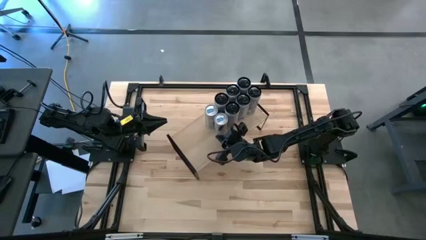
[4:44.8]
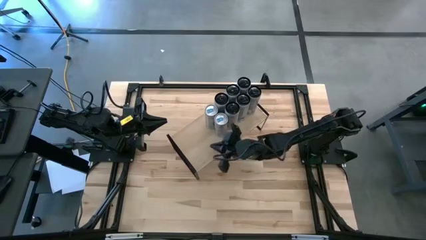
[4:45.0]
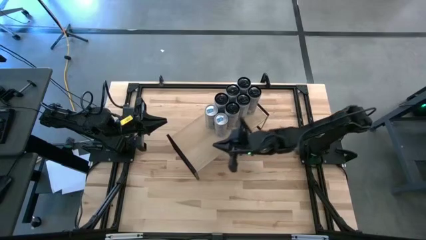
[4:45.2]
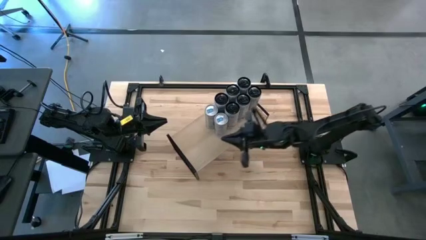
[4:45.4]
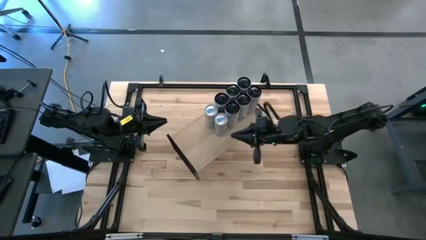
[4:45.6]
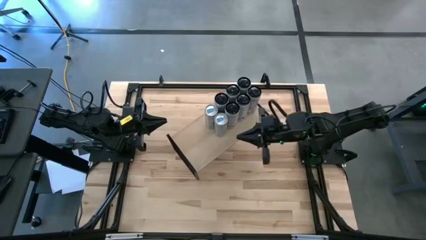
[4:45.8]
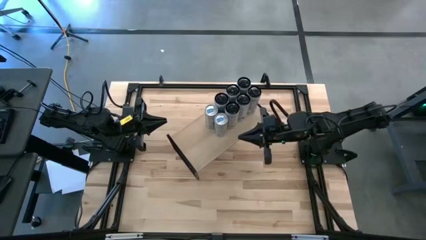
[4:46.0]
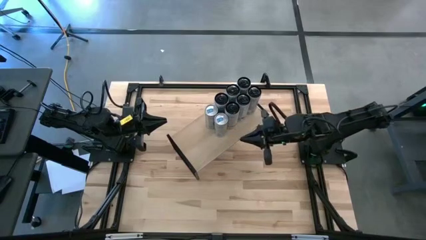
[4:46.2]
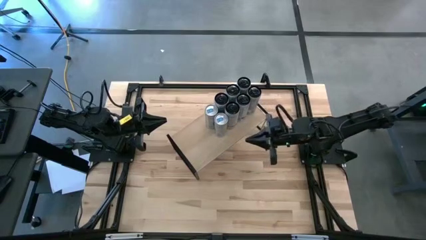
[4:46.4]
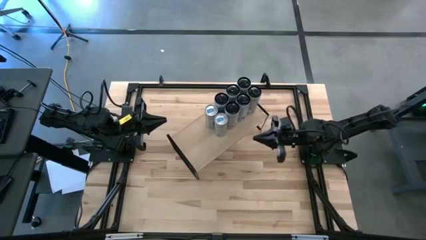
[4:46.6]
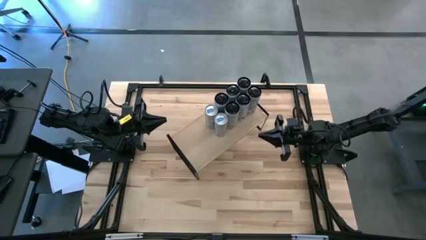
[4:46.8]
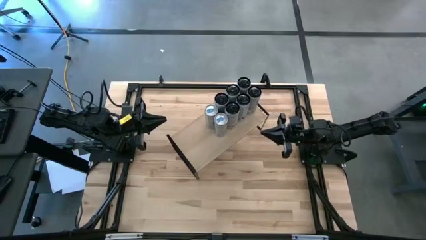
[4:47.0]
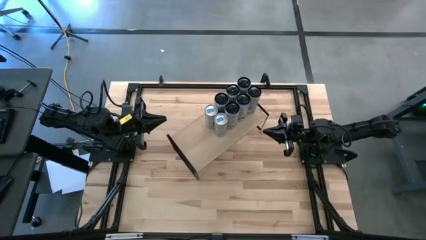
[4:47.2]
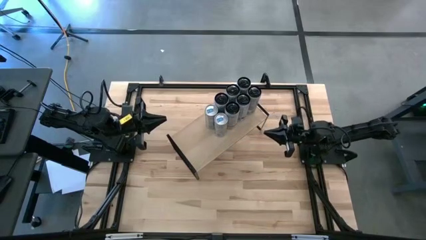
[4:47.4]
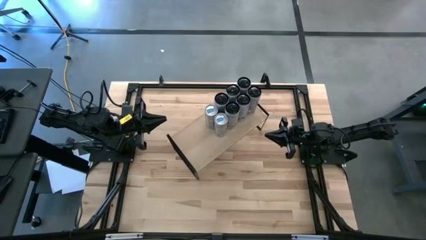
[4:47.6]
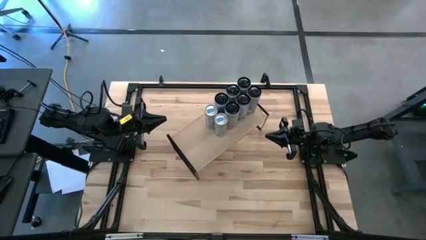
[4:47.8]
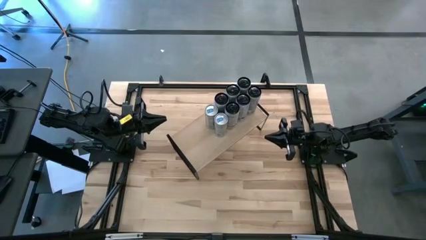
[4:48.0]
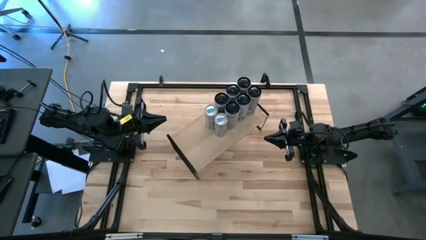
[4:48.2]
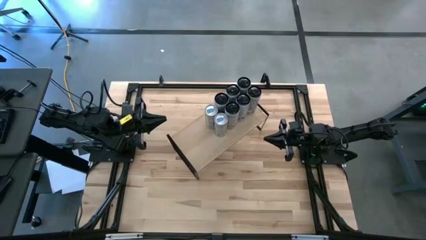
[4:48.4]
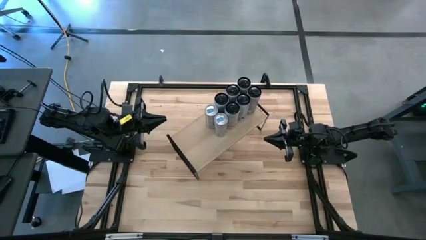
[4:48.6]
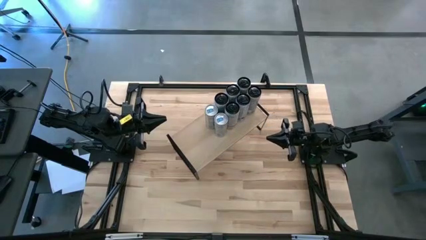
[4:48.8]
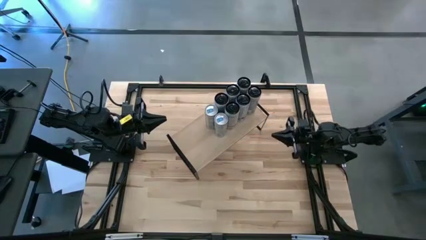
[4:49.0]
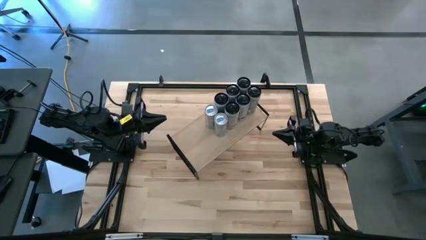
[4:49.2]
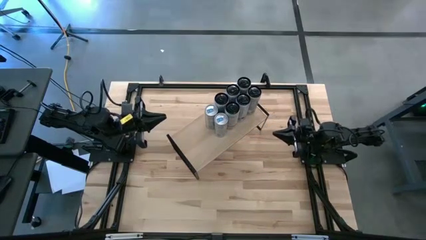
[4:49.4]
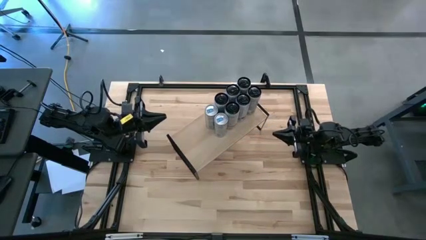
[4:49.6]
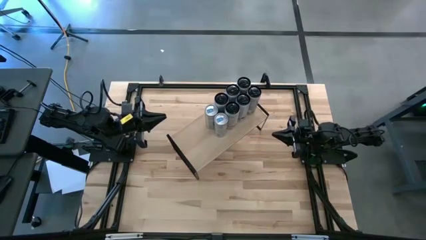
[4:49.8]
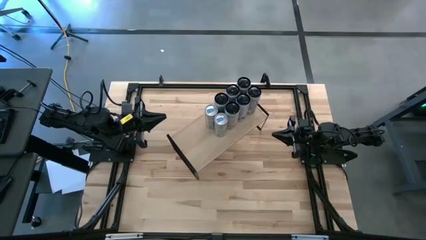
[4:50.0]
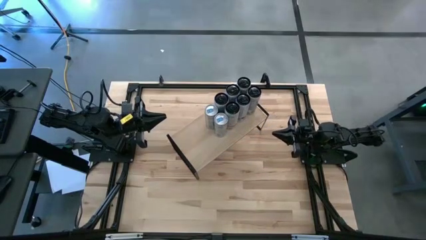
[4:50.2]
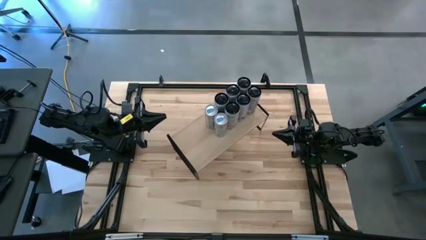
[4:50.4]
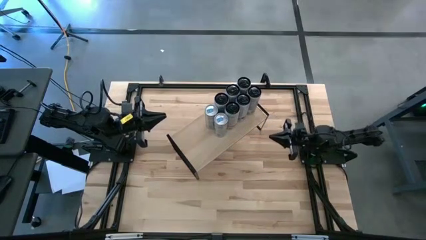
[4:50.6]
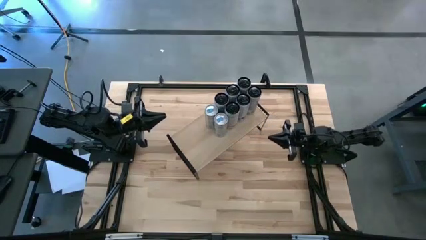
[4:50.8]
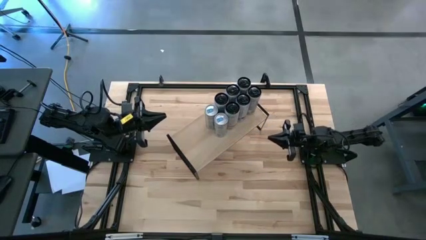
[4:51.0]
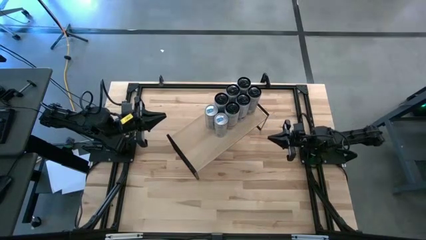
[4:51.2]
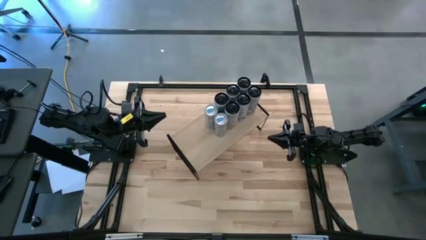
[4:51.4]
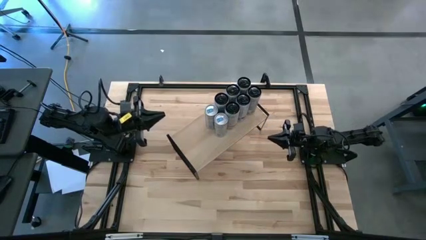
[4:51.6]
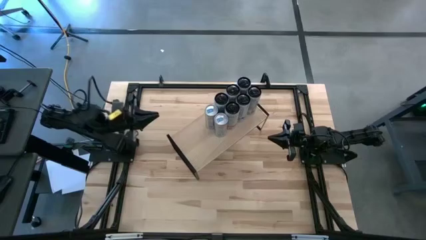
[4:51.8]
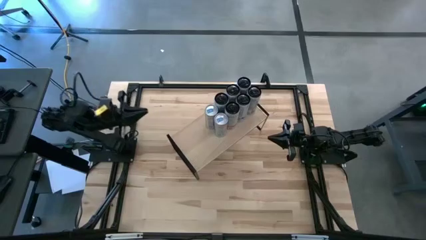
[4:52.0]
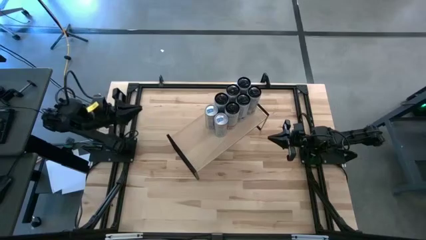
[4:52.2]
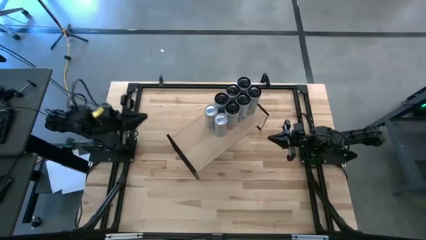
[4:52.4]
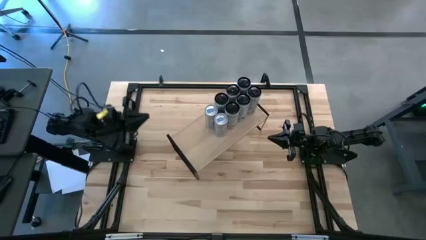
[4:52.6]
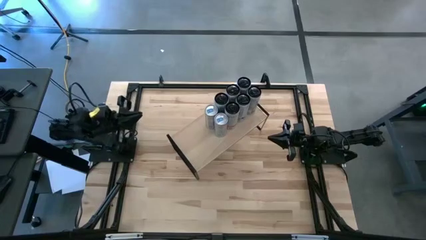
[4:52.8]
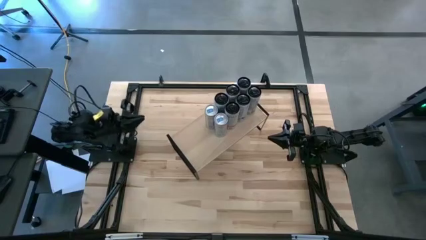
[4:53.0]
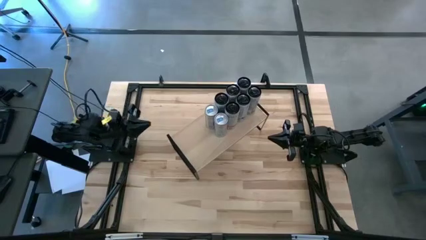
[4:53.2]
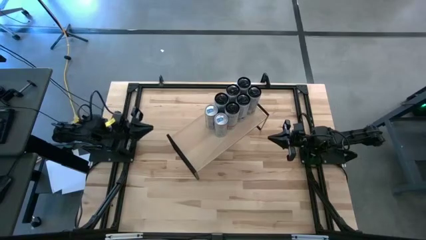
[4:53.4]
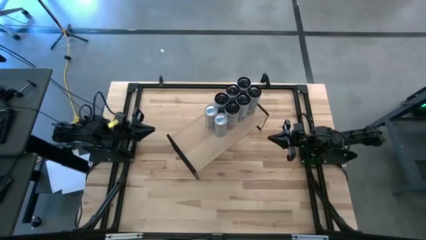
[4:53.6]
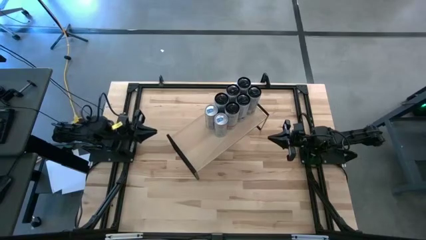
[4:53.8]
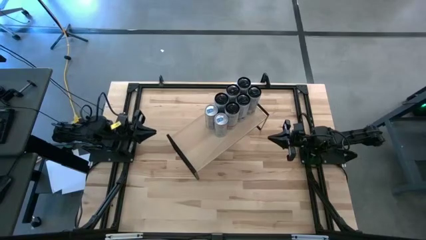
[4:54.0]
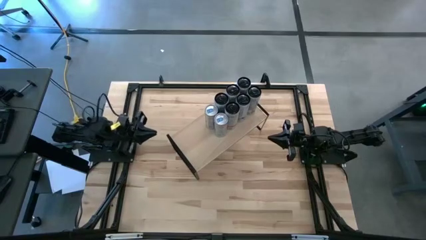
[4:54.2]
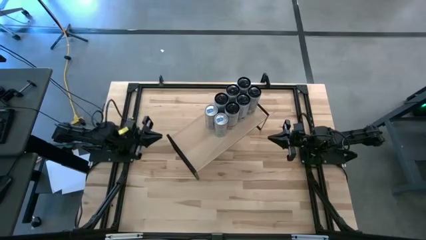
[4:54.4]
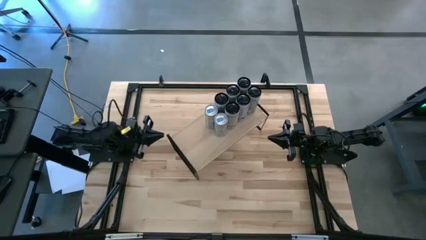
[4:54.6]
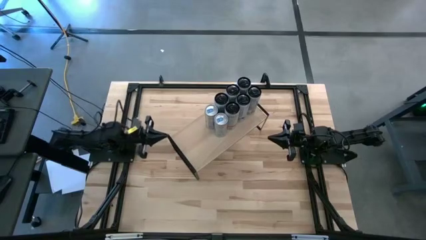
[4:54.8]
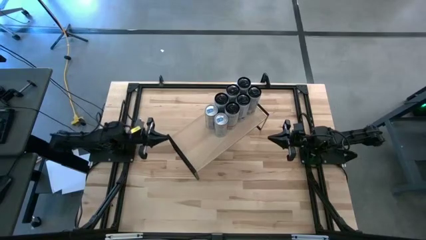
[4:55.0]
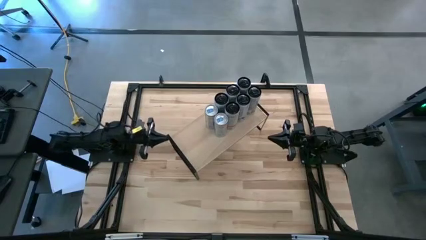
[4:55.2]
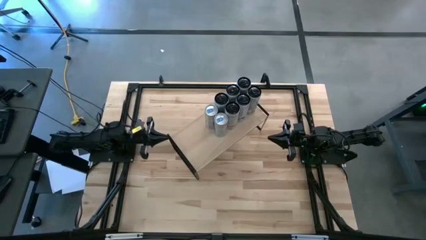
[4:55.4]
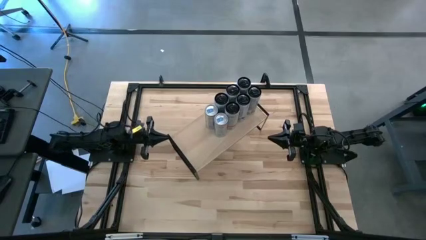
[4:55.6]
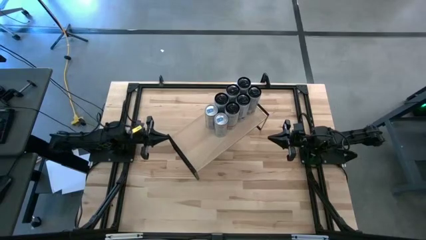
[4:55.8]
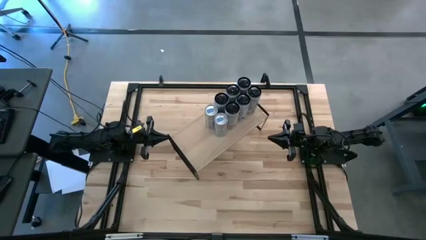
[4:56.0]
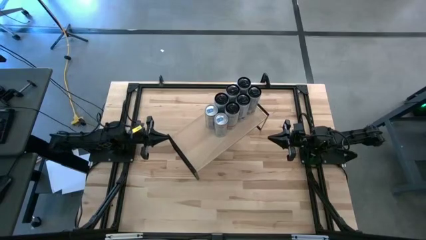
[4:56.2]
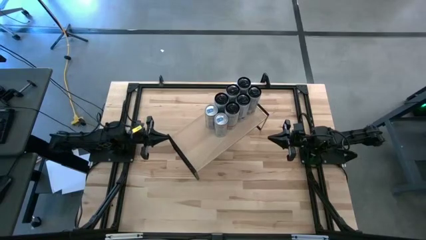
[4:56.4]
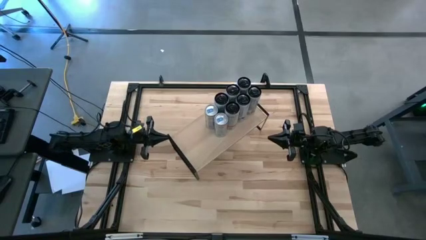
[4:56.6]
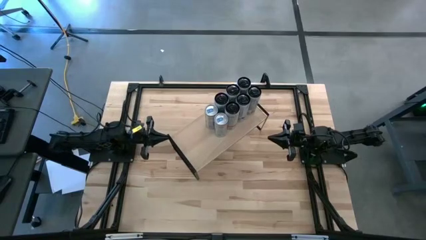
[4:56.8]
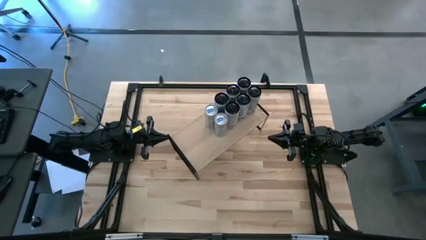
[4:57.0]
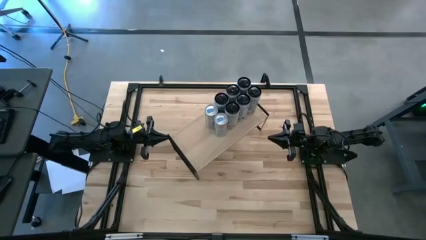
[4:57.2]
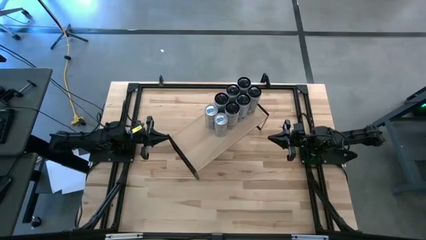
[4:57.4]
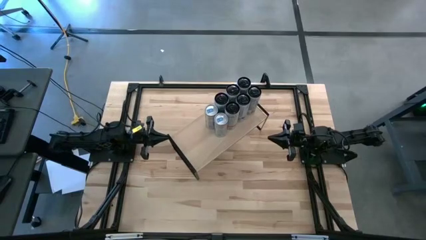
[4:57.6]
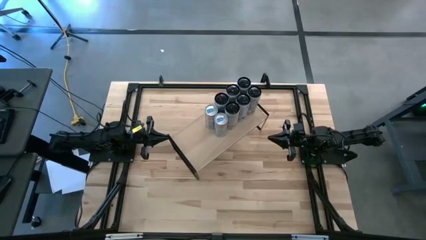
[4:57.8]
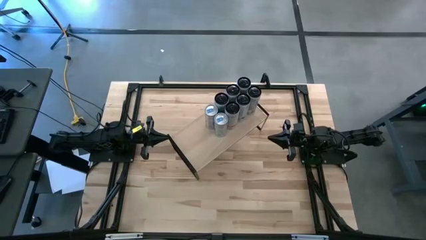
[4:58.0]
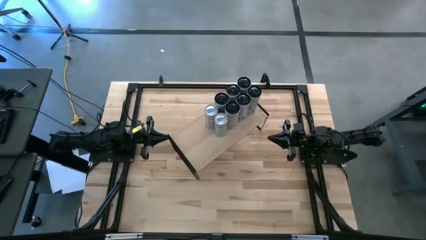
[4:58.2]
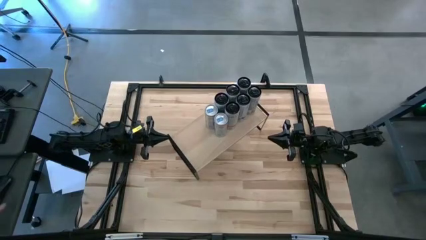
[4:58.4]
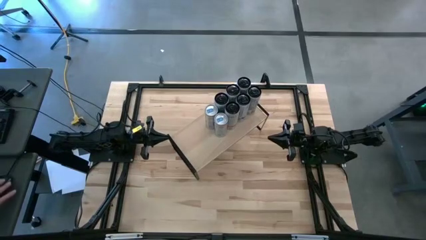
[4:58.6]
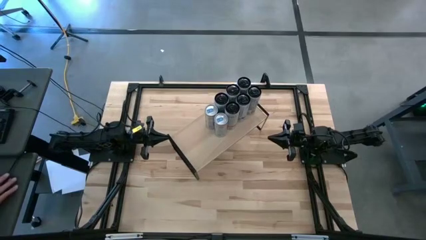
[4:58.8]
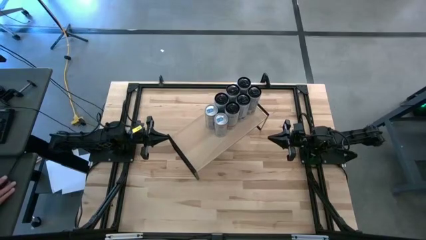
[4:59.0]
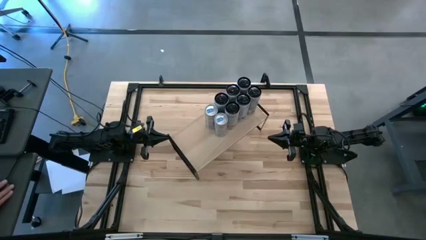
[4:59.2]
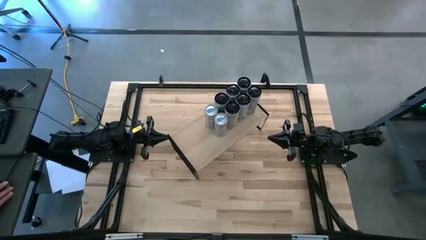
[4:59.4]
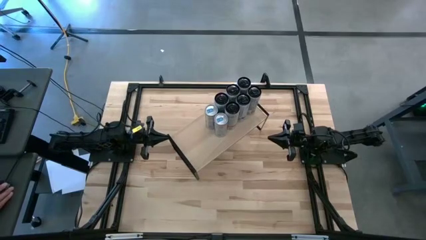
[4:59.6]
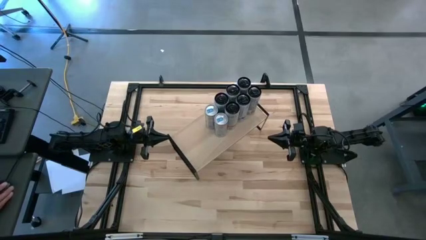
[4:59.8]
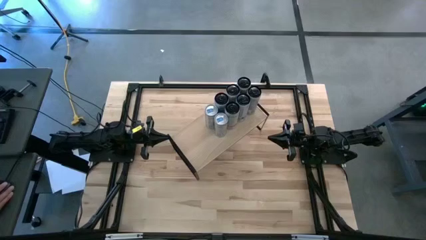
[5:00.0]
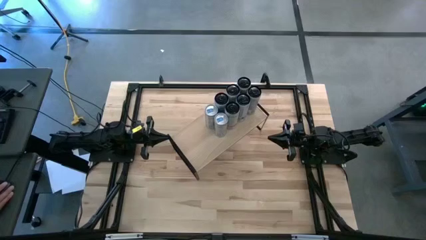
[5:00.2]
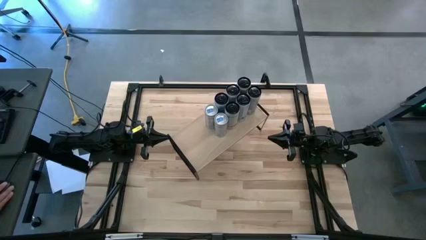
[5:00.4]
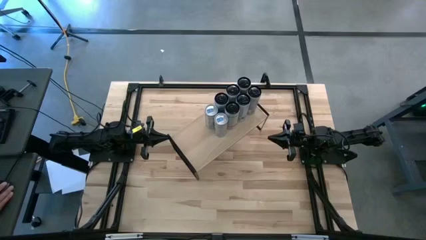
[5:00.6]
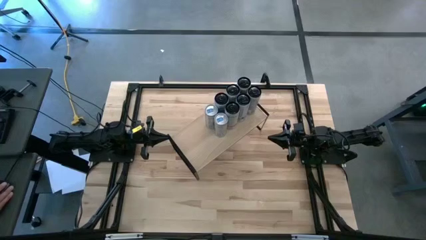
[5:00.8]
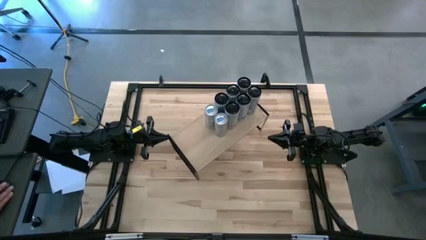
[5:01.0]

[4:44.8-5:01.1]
Task: Place canned beverage on shelf
Return to Home Position
